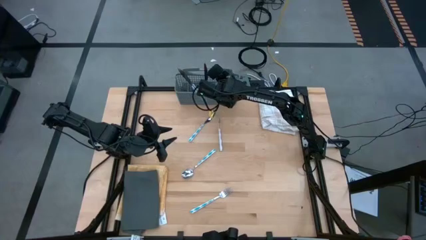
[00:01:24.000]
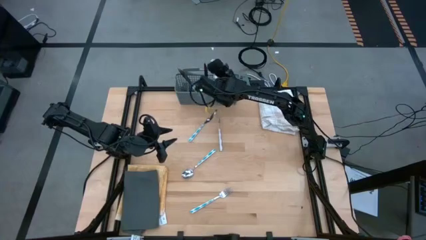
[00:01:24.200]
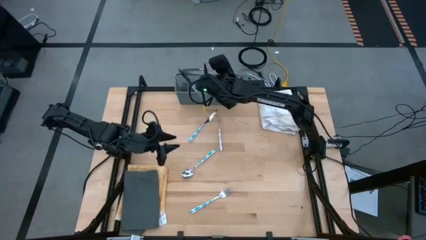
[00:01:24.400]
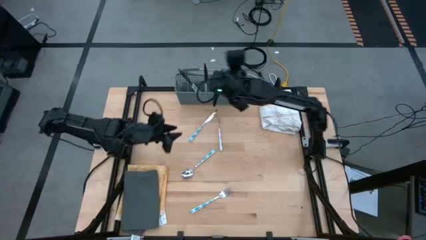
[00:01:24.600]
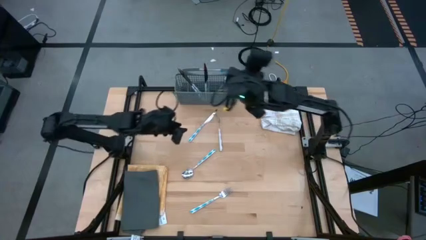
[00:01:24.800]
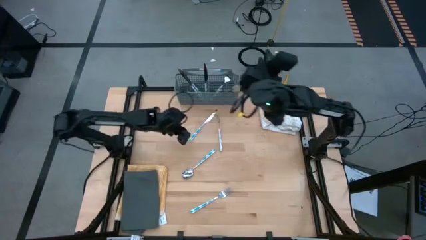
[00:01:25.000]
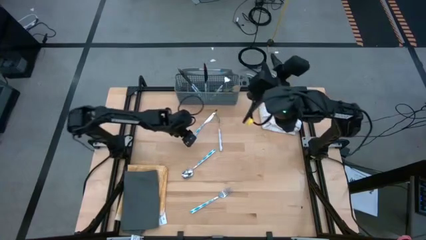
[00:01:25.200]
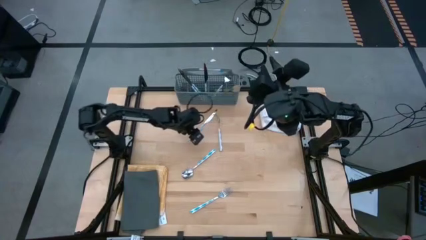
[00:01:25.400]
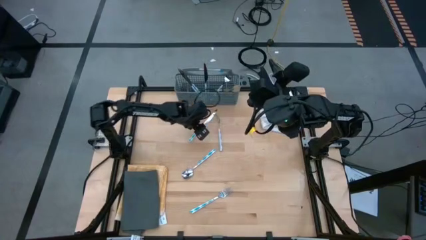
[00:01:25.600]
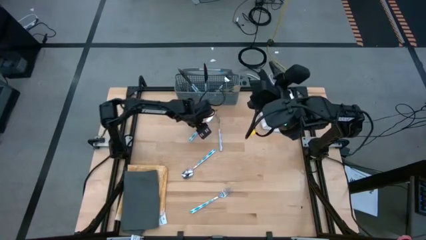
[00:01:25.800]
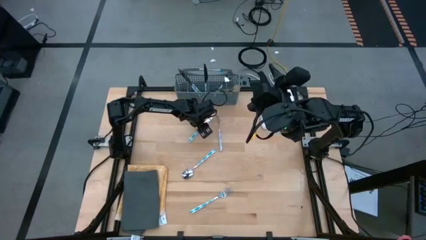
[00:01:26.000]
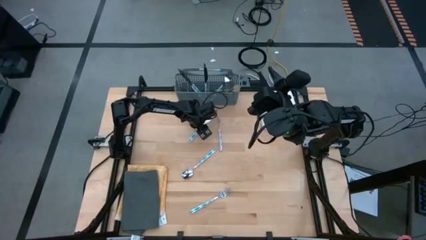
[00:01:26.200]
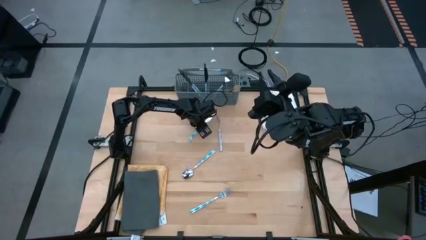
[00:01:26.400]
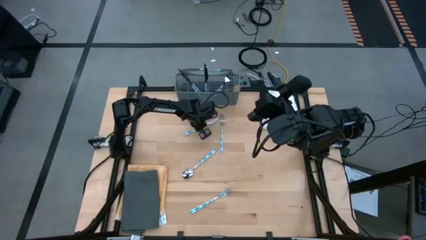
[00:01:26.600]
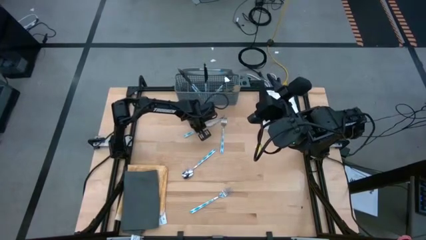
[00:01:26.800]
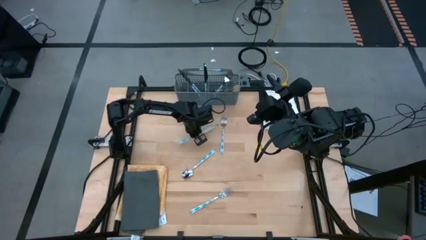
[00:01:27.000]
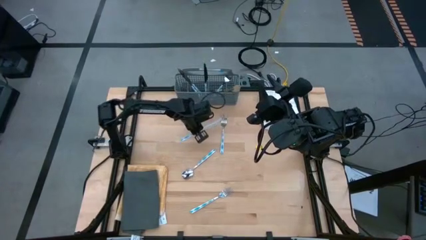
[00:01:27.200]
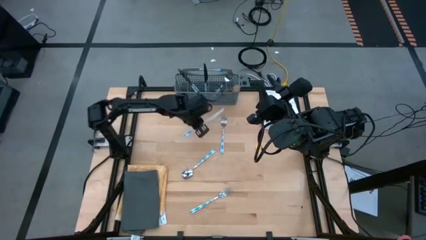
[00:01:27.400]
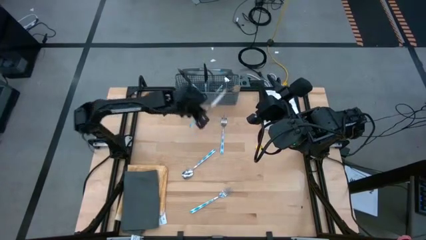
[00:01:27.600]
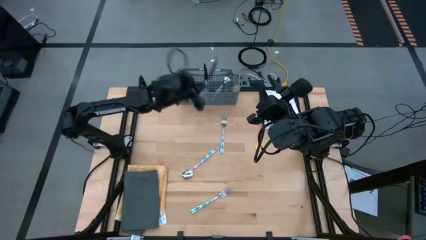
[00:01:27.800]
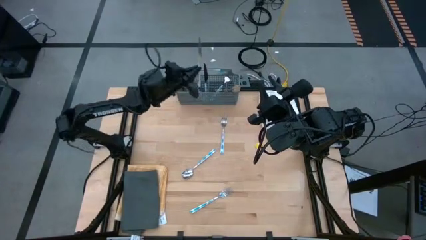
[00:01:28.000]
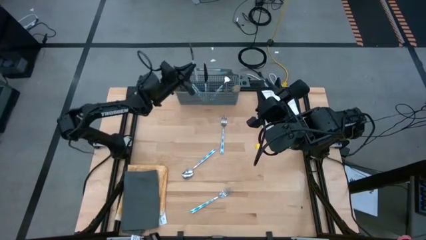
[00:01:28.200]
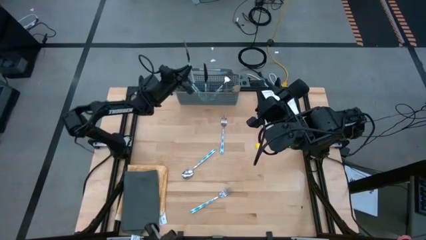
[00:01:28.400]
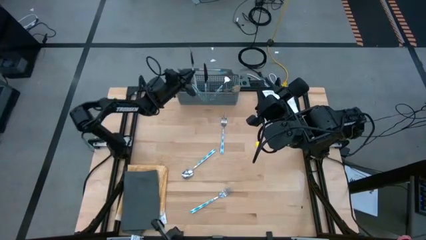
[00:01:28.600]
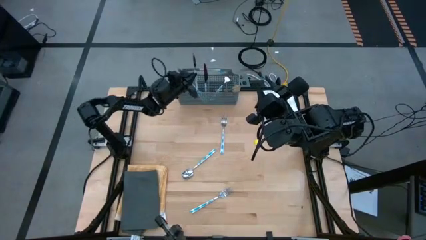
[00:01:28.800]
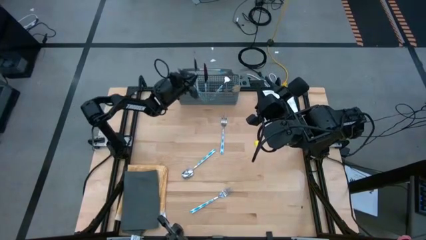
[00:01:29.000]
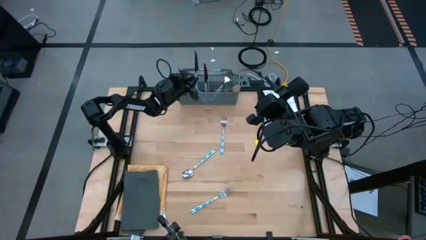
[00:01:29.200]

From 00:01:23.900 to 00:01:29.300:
Task: Sort silverware
Put the blue table knife into the gray silverware rack

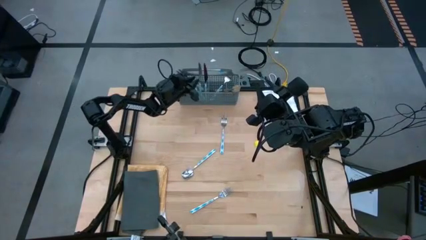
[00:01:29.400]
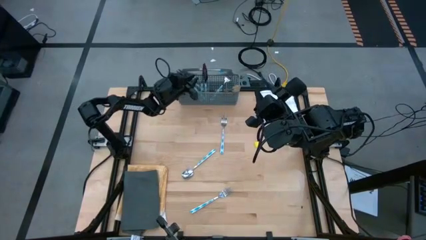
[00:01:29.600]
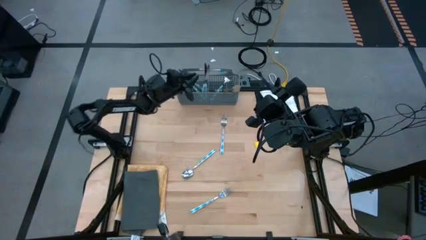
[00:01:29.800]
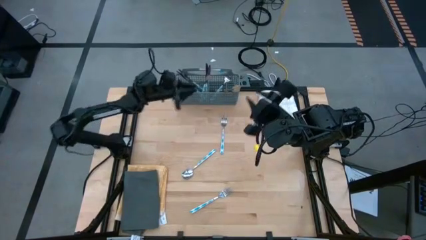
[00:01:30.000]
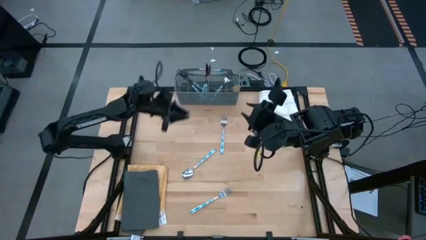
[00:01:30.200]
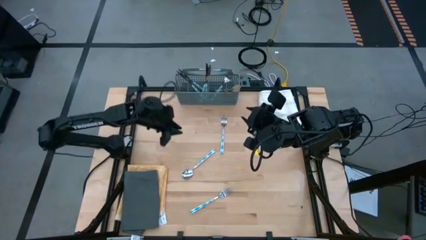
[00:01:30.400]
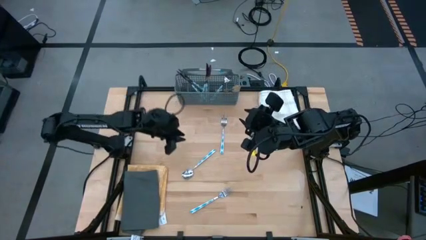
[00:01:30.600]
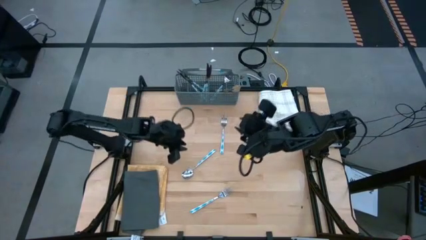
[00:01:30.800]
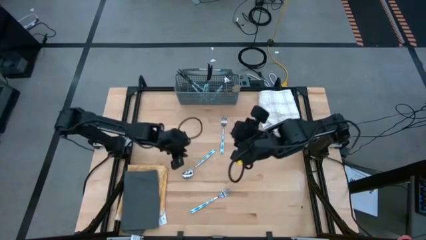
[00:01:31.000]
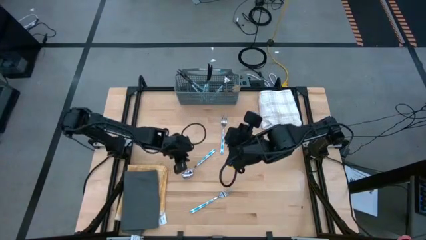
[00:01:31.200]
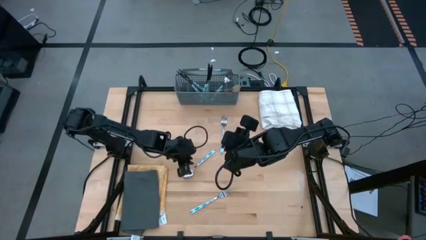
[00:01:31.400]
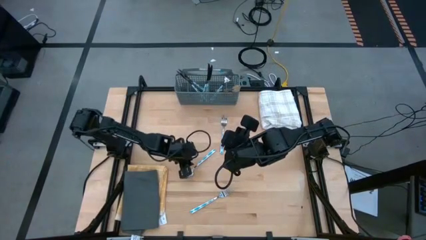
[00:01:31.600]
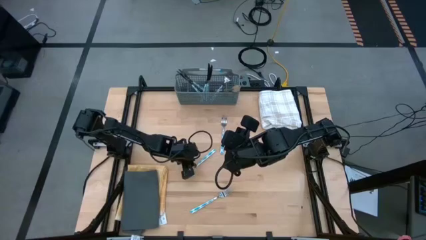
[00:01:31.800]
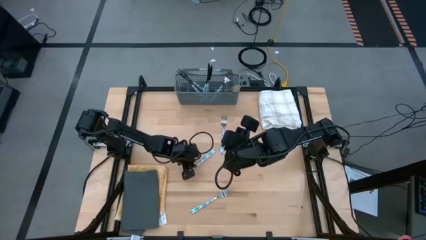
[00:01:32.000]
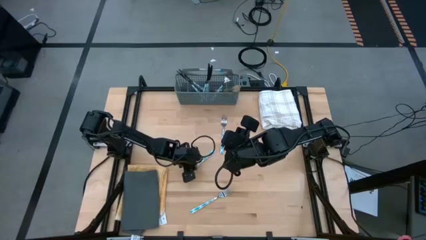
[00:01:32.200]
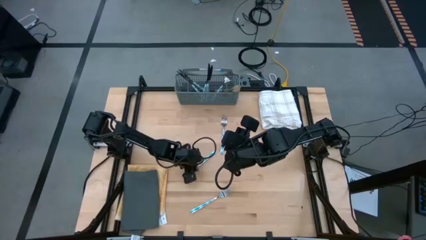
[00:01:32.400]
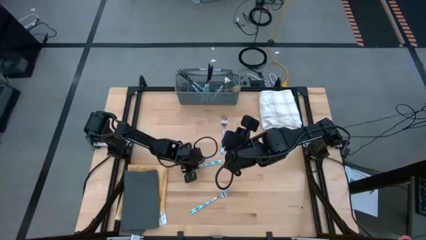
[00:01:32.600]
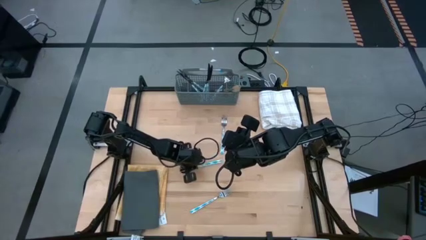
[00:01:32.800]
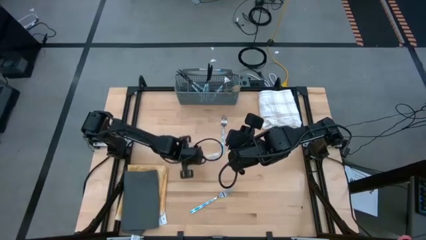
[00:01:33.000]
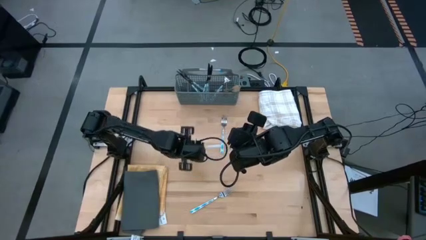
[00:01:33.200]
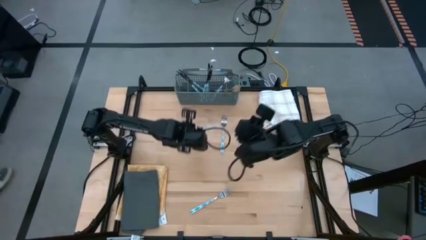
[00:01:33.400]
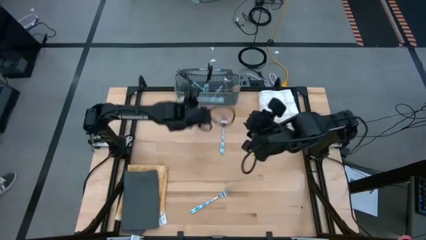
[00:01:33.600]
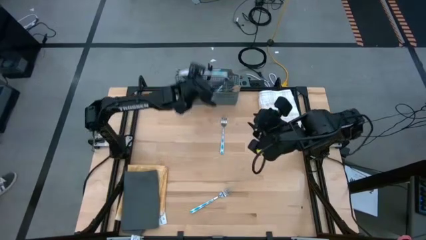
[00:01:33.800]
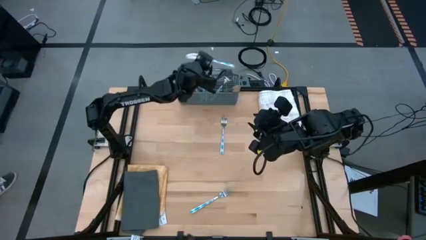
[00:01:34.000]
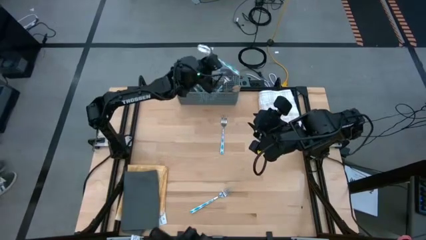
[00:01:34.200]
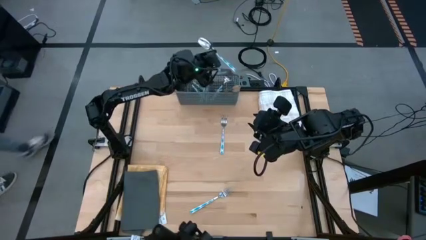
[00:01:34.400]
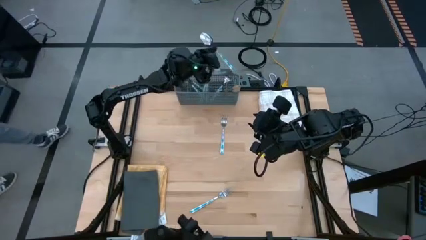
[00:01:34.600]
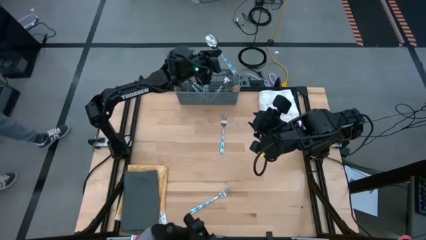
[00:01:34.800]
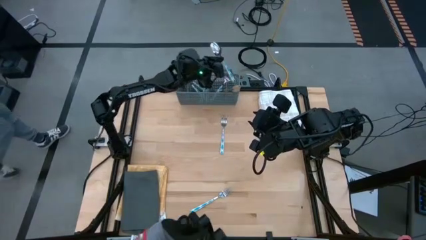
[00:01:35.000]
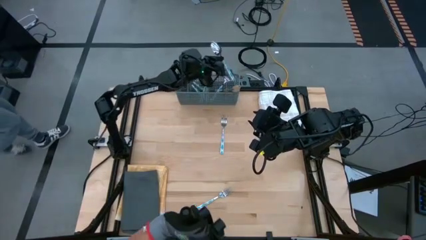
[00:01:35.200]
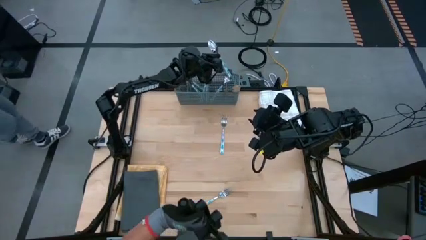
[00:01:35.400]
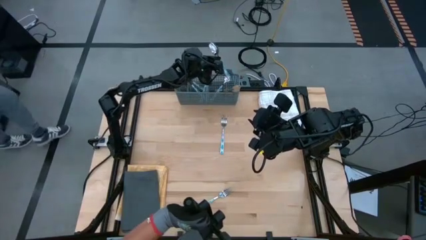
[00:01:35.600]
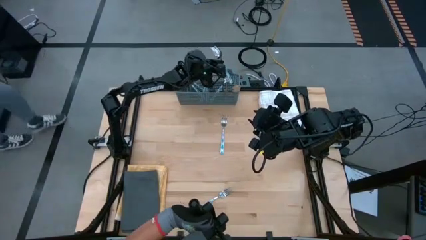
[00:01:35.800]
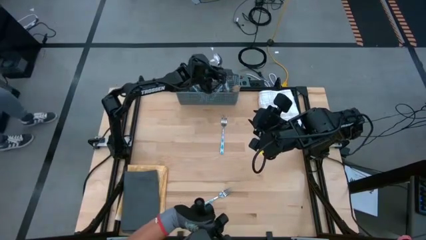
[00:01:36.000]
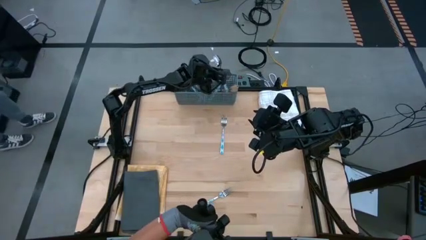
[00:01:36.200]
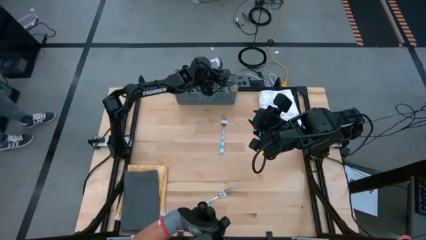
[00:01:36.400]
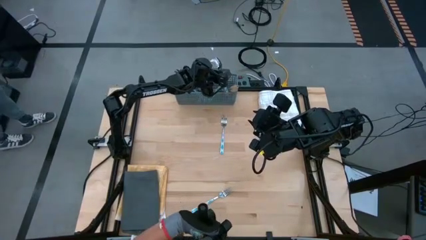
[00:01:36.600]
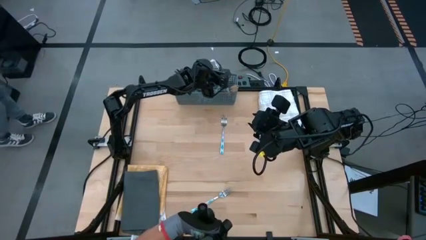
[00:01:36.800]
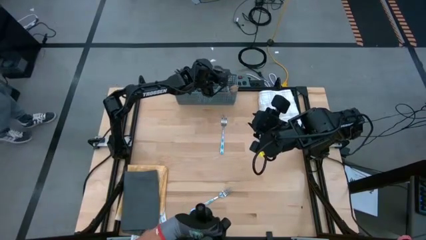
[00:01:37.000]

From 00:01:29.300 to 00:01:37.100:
Put the blue spoon into the gray silverware rack
